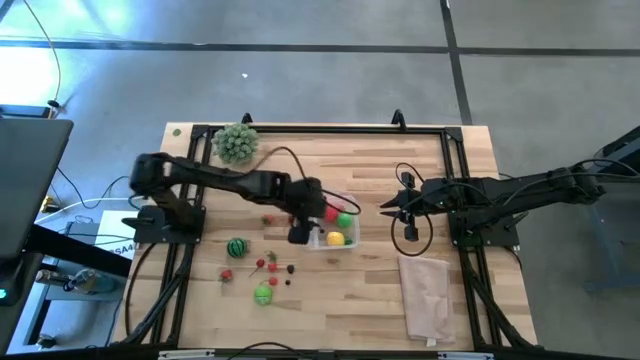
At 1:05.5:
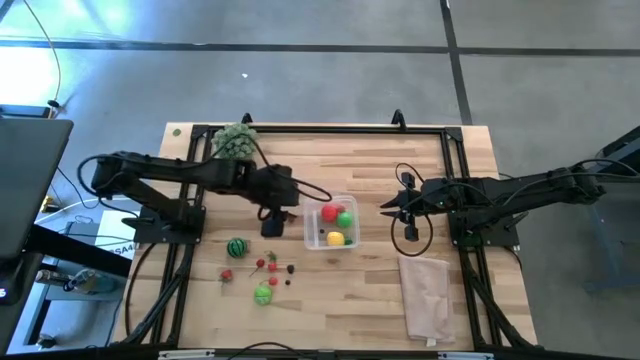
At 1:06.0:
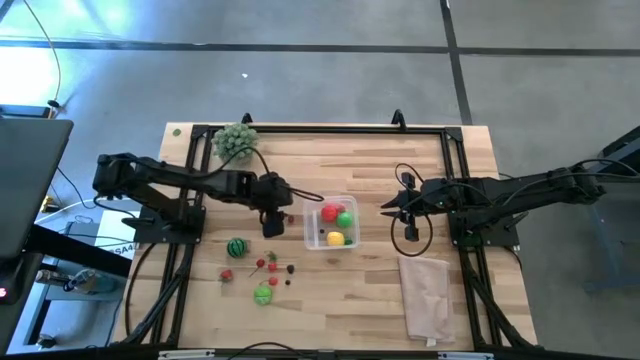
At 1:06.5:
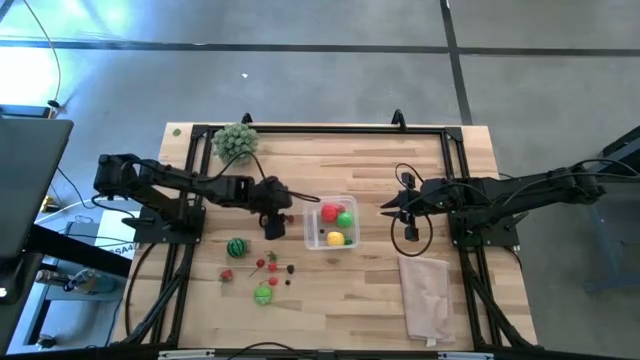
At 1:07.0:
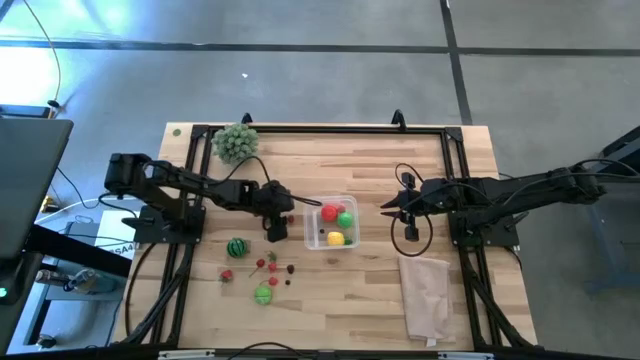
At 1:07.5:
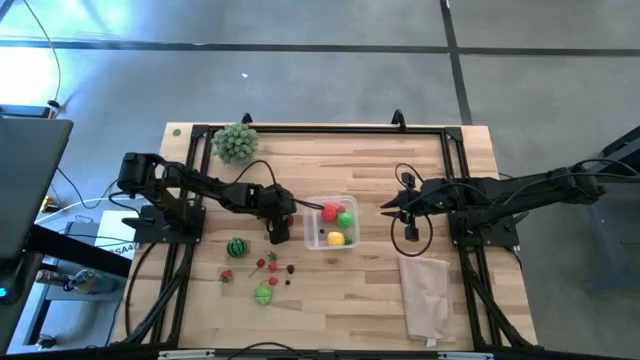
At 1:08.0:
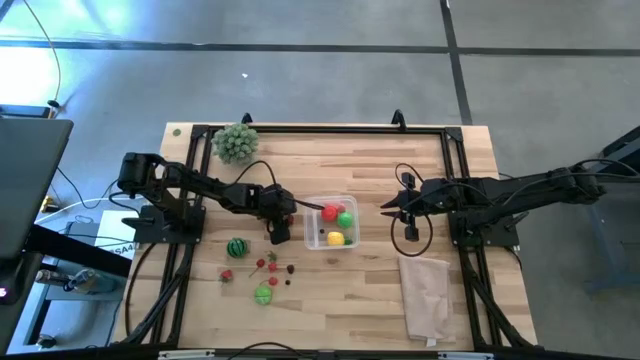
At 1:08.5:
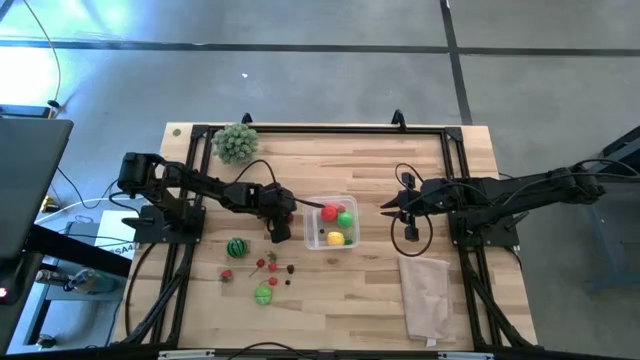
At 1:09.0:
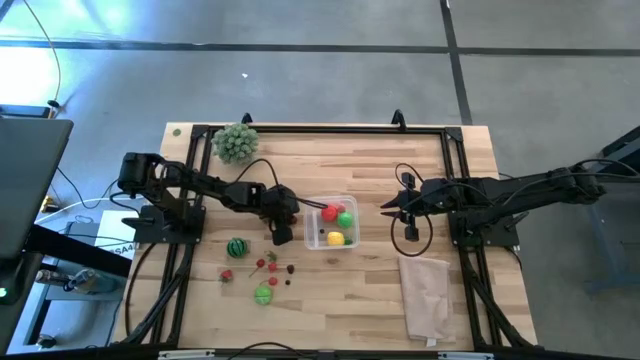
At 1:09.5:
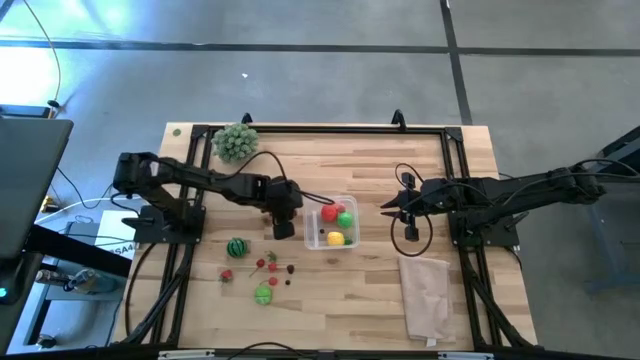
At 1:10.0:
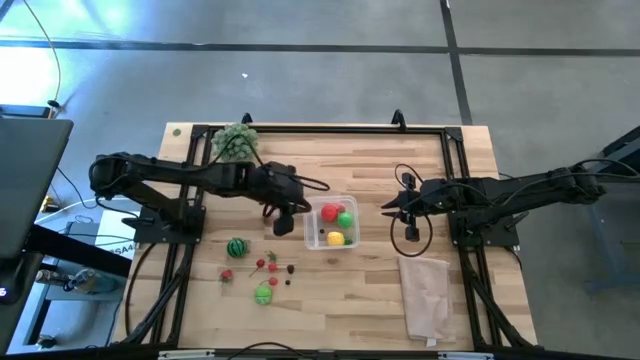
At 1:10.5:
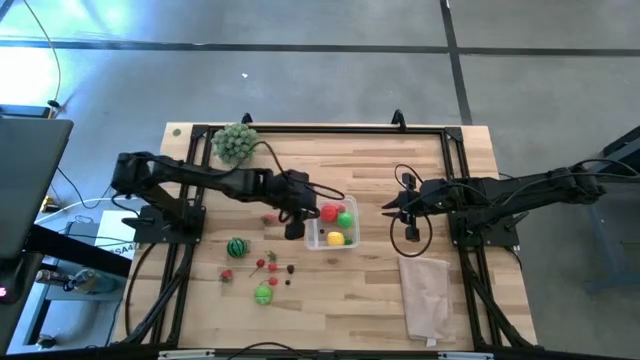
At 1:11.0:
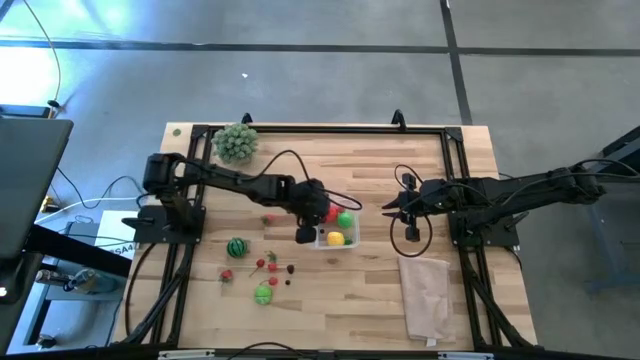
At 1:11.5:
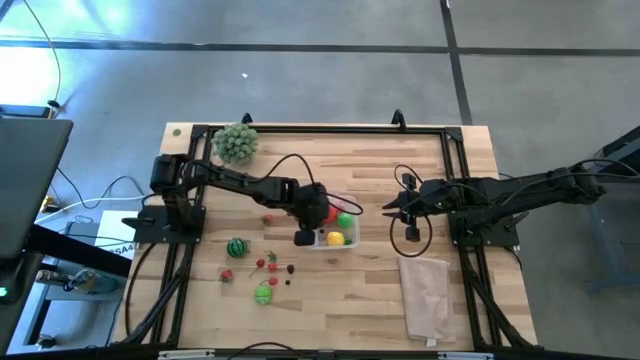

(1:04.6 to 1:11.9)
Task: Pick and placing Produce into tupperware
Put the top red cherry into the transparent bin

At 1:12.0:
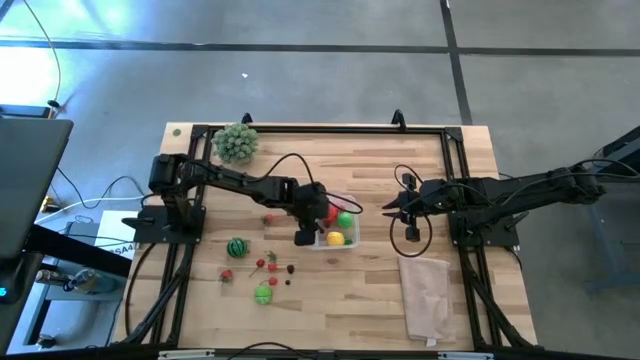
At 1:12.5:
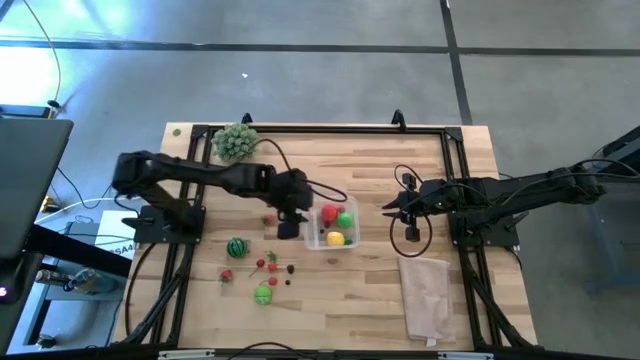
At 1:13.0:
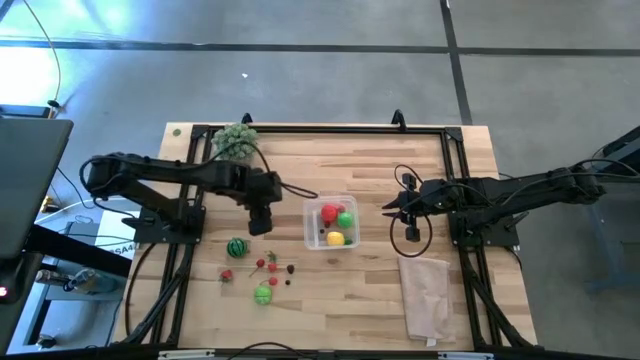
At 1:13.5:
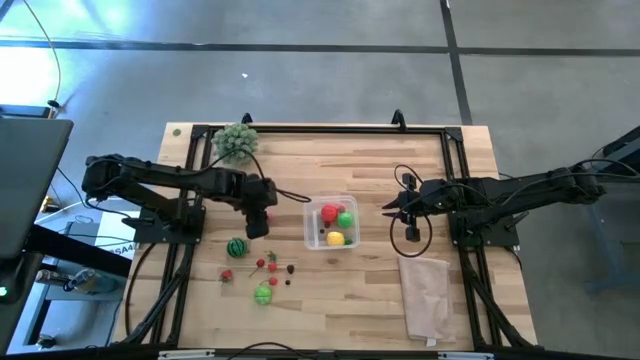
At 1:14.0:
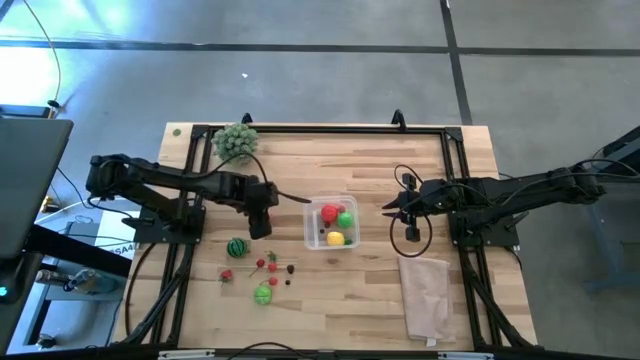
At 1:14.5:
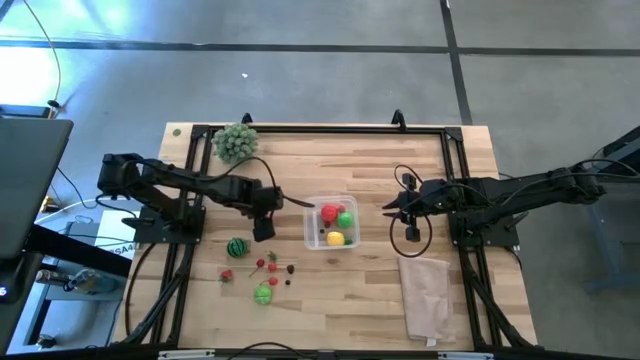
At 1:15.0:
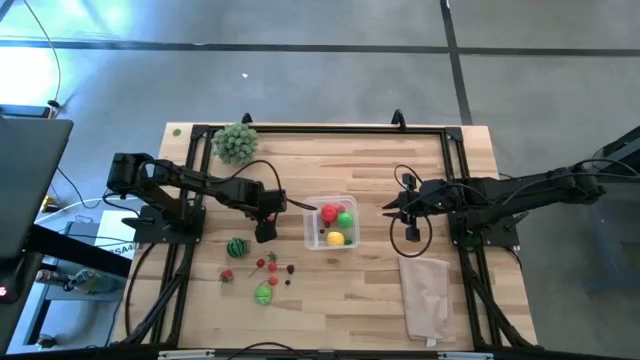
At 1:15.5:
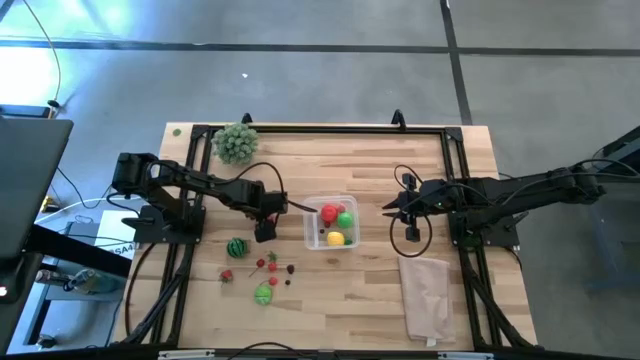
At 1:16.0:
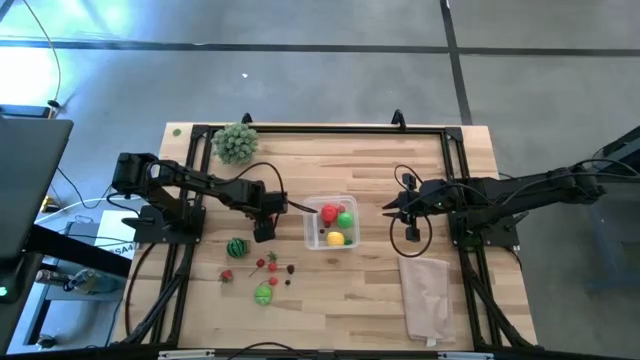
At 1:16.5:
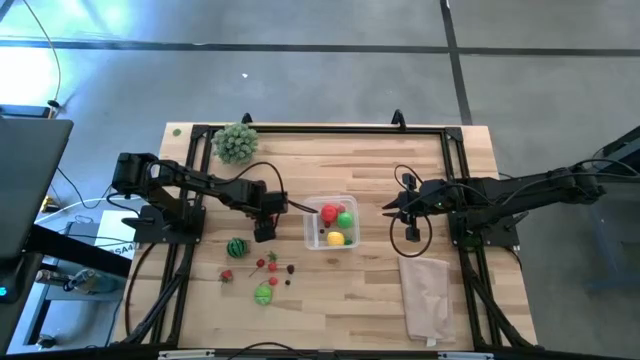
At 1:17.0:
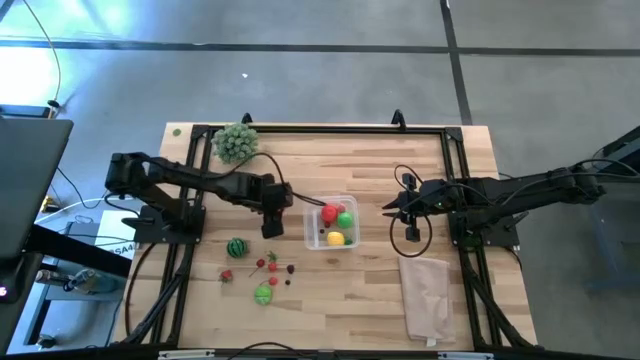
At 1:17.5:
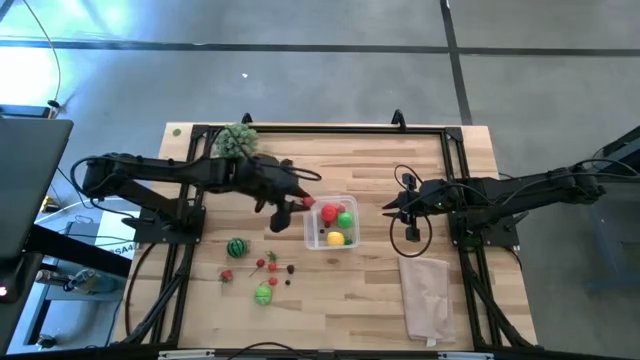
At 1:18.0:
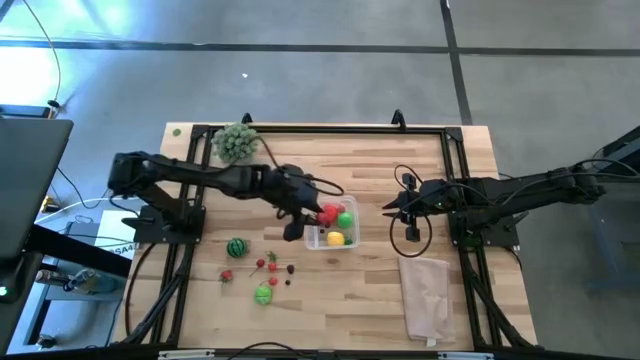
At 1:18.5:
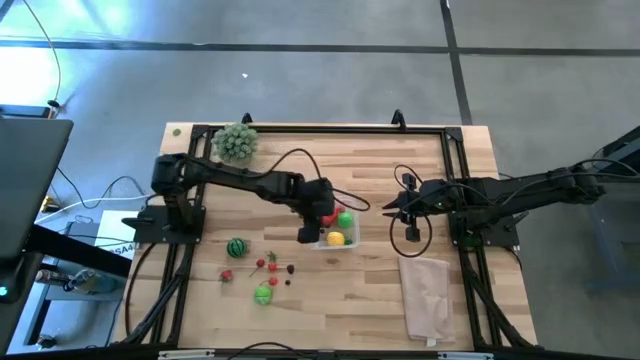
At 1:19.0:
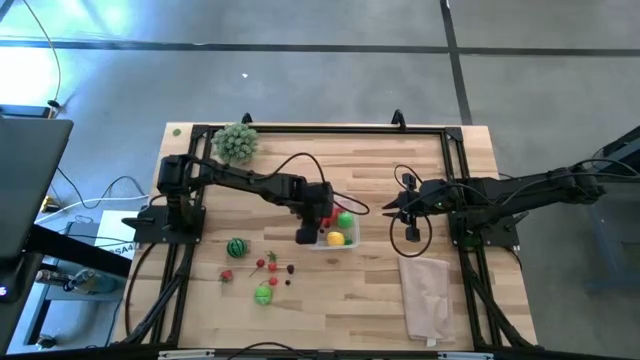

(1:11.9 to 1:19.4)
Put the top red strawberry into the transparent bin

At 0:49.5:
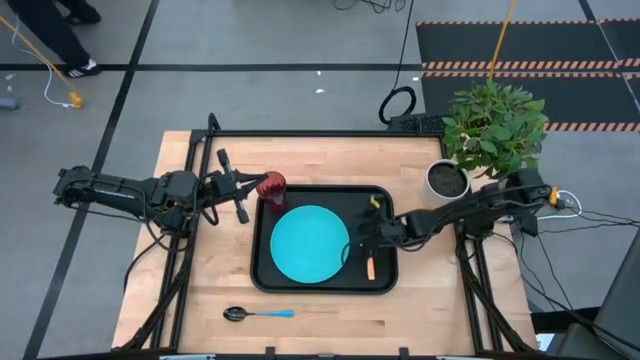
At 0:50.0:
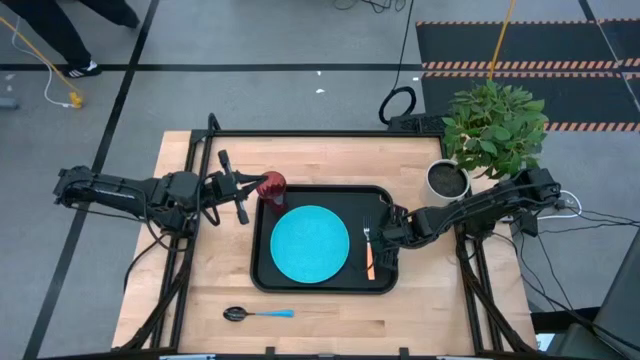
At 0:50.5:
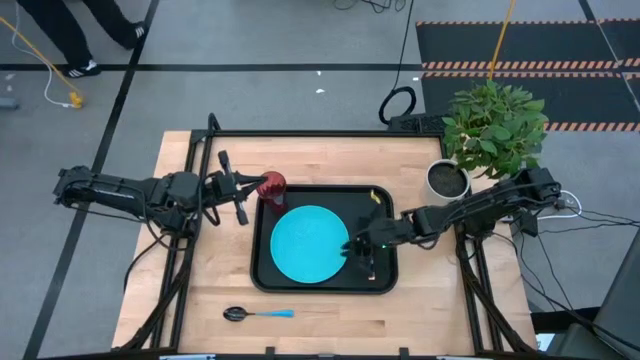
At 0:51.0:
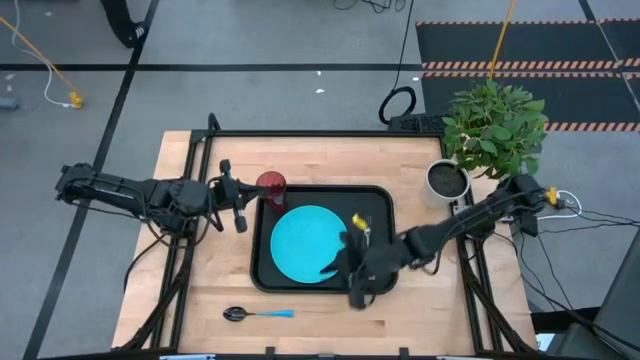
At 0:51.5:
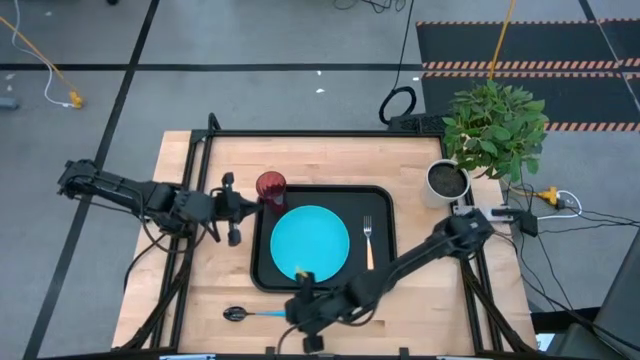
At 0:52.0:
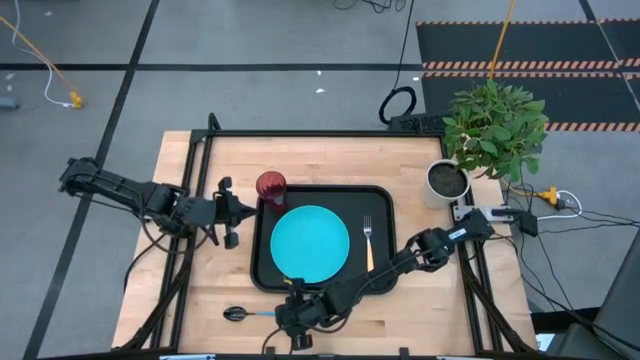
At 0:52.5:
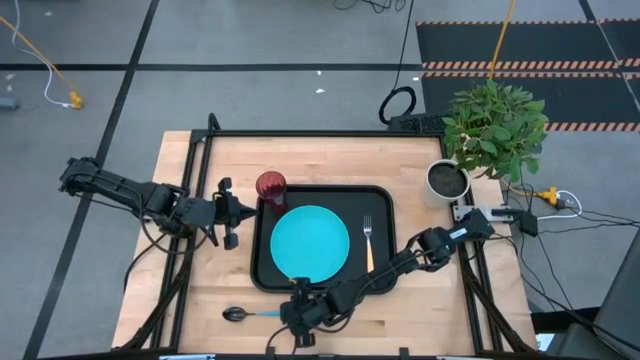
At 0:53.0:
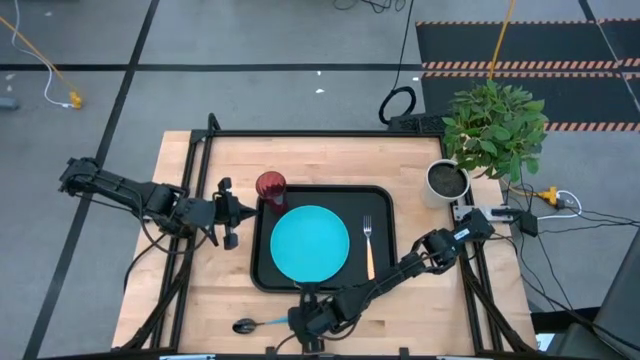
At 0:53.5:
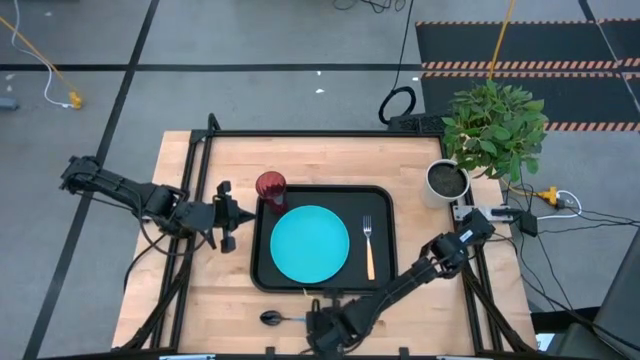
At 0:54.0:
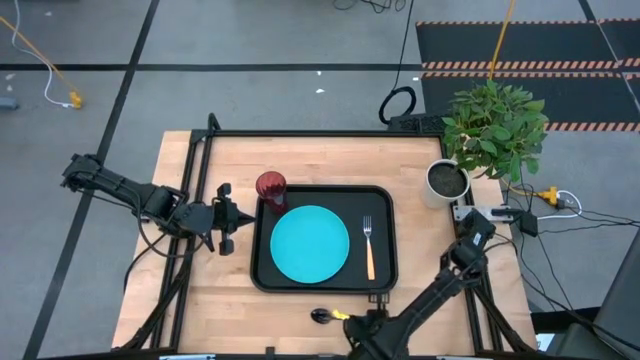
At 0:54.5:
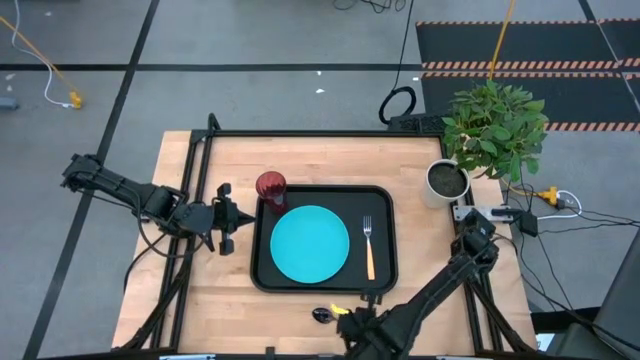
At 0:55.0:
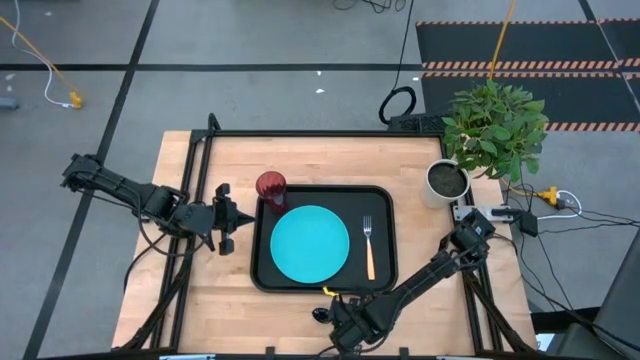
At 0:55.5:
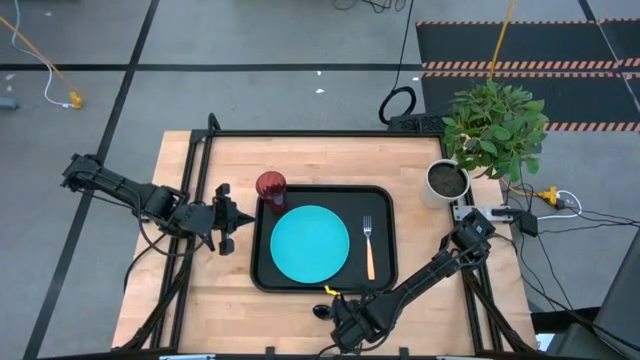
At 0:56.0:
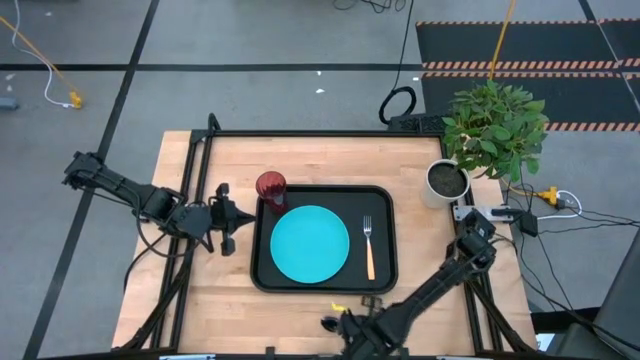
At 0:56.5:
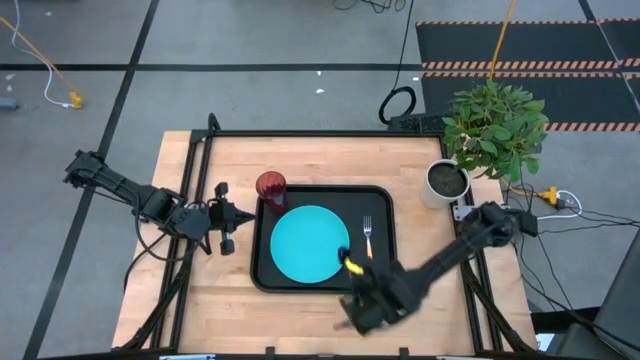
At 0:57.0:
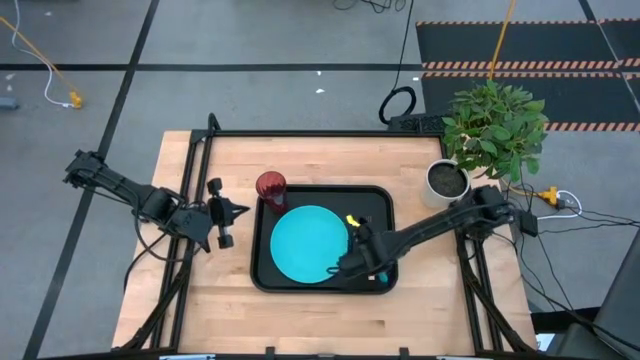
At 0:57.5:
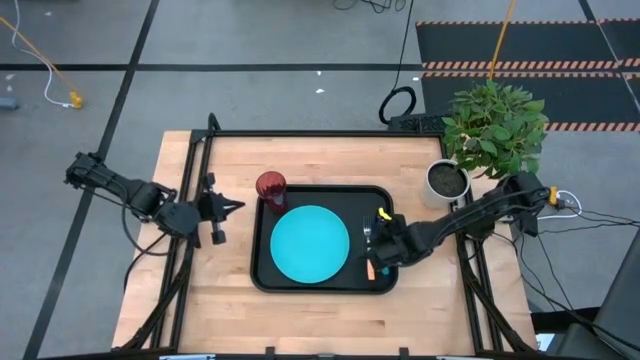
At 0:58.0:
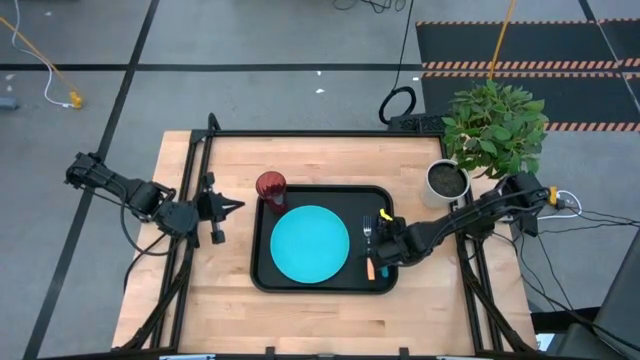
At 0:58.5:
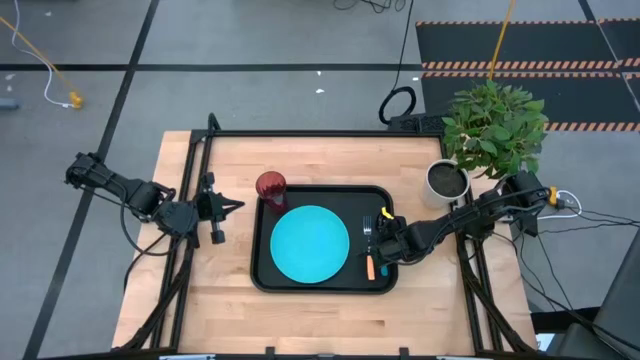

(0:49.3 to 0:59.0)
Task: Pick and place plate/cup/fork/spoon on tray
Put the blue spoon to the right side of the orange fork on the black serving tray
